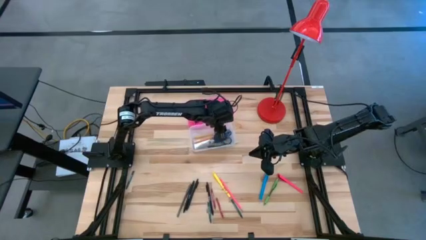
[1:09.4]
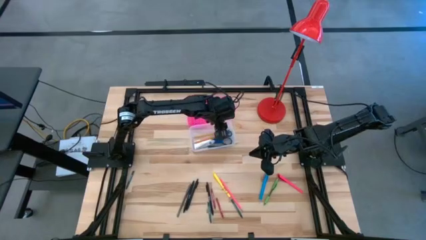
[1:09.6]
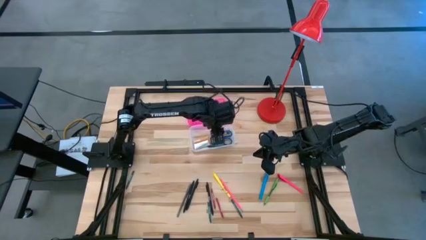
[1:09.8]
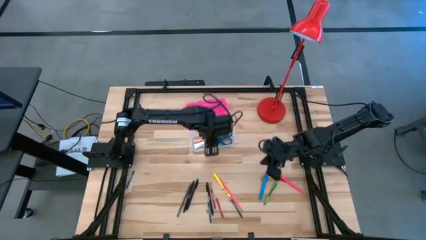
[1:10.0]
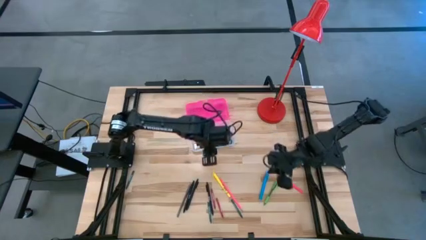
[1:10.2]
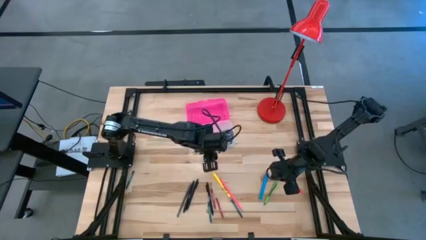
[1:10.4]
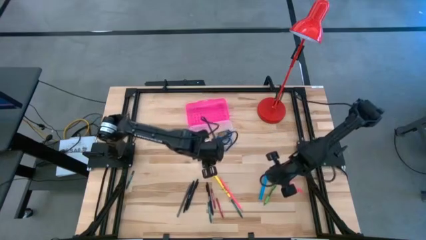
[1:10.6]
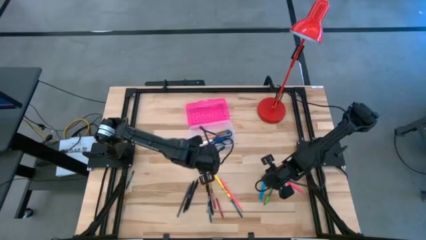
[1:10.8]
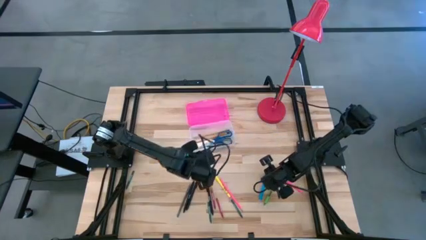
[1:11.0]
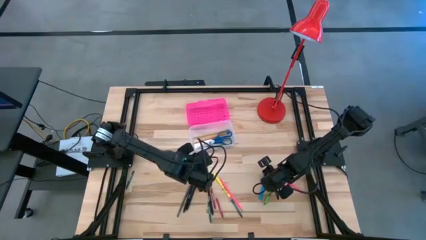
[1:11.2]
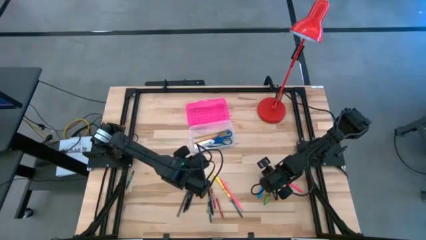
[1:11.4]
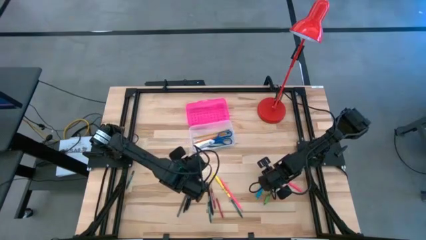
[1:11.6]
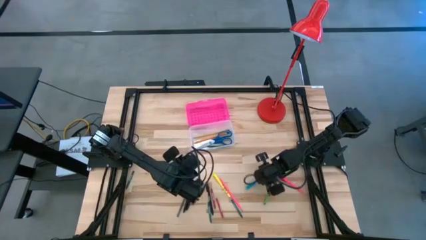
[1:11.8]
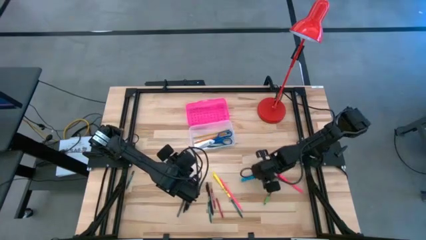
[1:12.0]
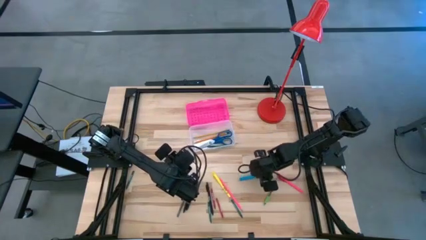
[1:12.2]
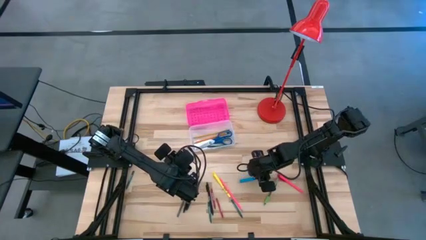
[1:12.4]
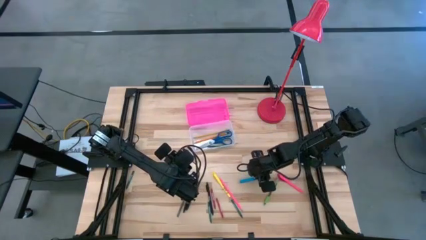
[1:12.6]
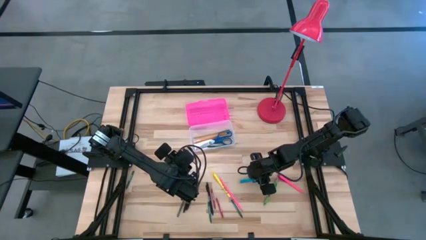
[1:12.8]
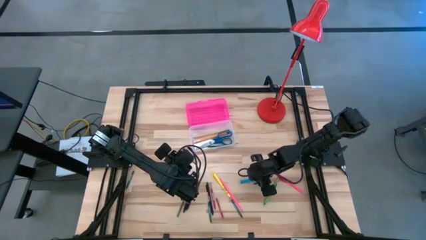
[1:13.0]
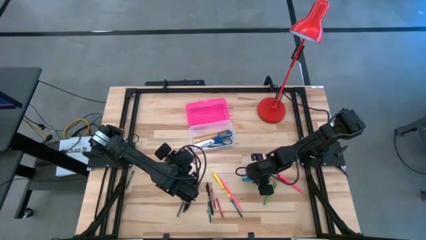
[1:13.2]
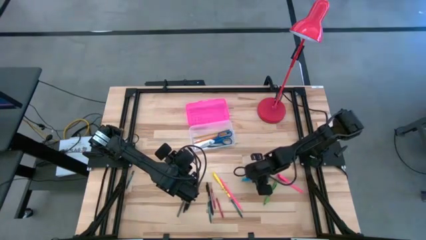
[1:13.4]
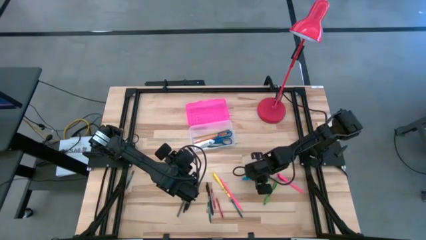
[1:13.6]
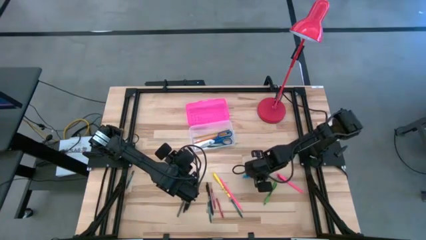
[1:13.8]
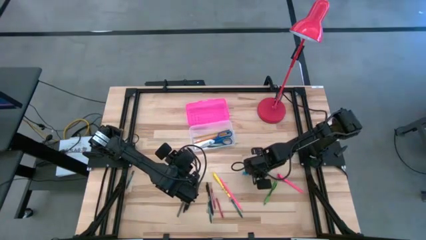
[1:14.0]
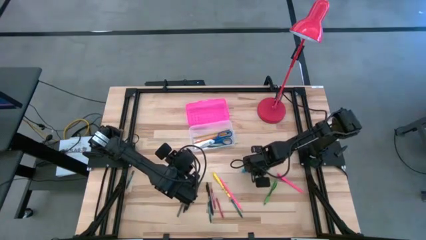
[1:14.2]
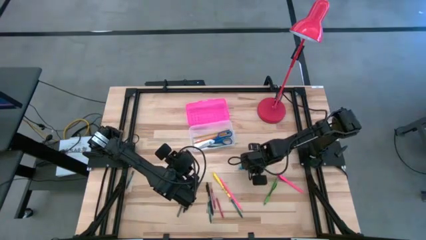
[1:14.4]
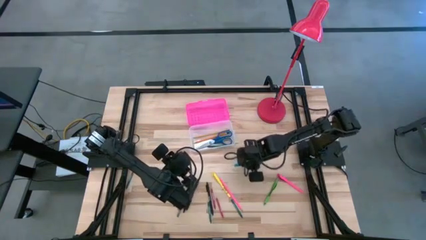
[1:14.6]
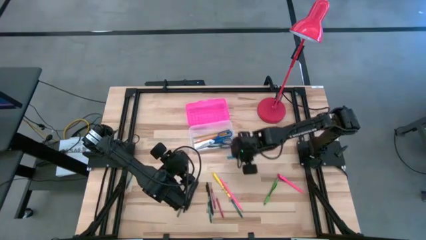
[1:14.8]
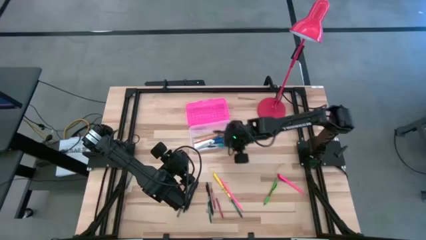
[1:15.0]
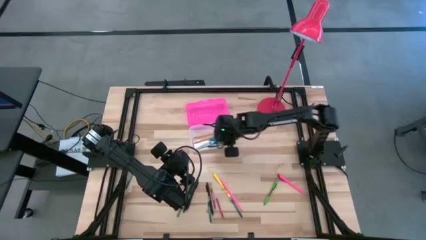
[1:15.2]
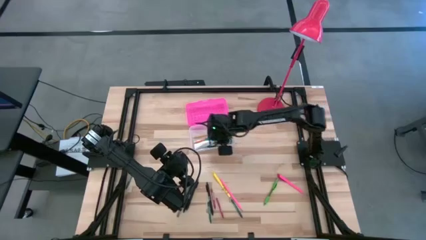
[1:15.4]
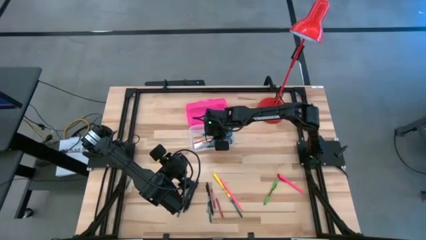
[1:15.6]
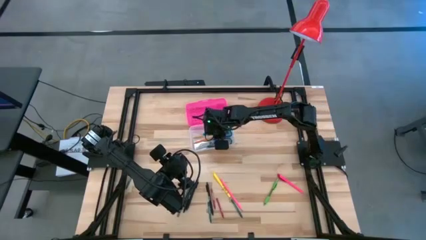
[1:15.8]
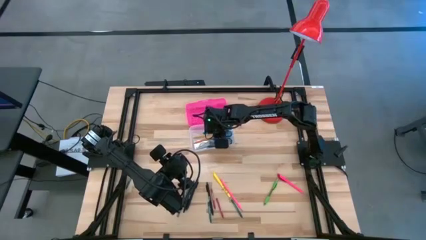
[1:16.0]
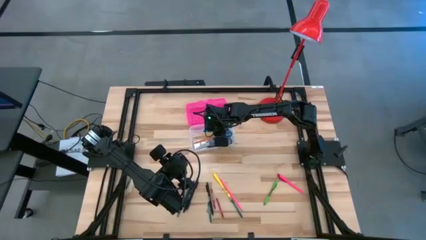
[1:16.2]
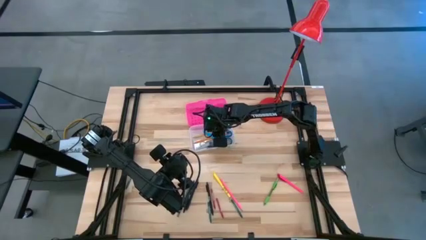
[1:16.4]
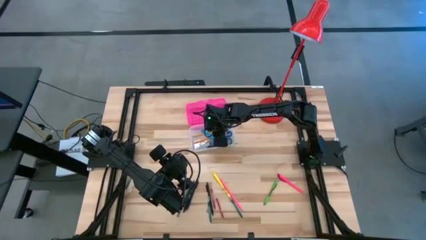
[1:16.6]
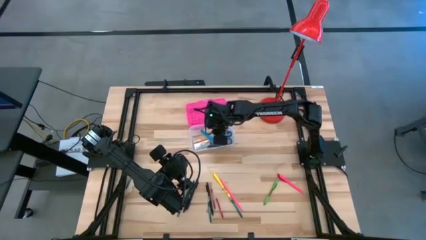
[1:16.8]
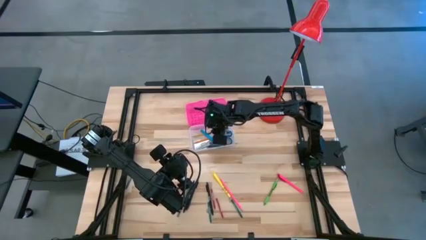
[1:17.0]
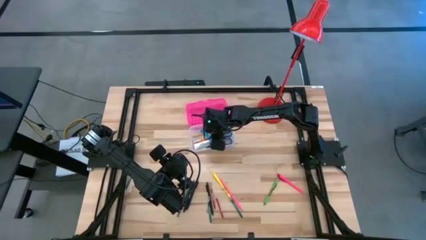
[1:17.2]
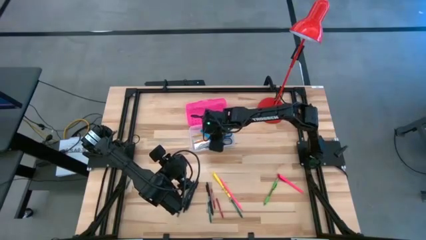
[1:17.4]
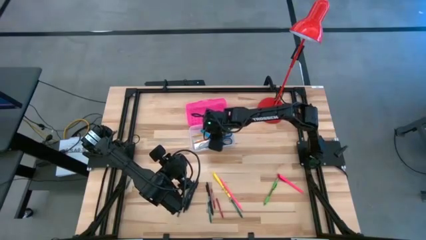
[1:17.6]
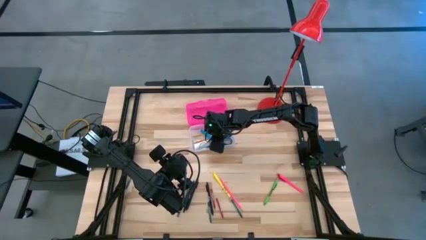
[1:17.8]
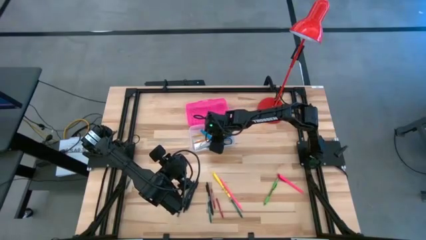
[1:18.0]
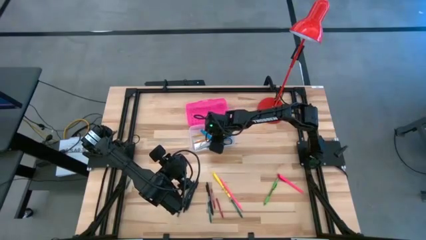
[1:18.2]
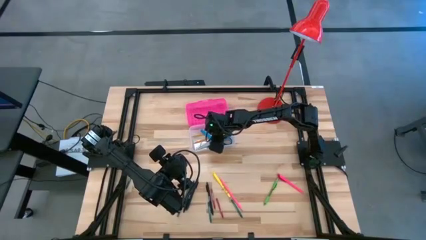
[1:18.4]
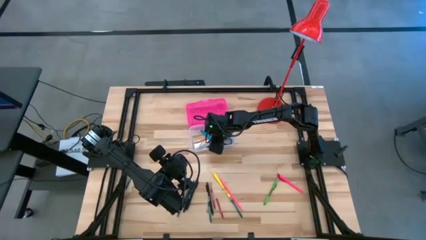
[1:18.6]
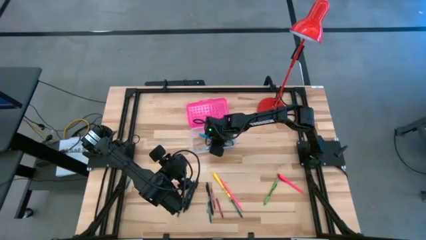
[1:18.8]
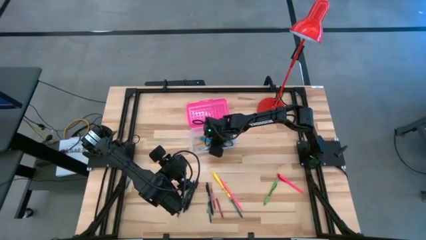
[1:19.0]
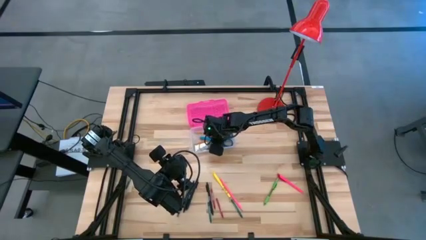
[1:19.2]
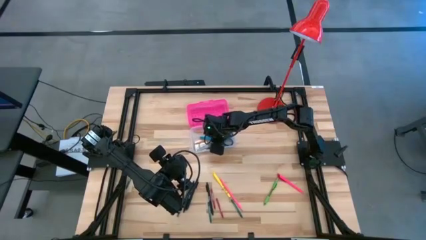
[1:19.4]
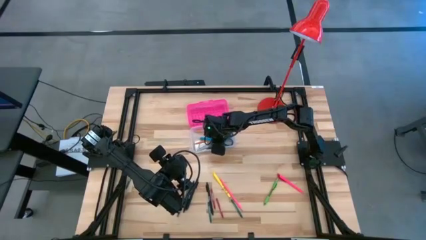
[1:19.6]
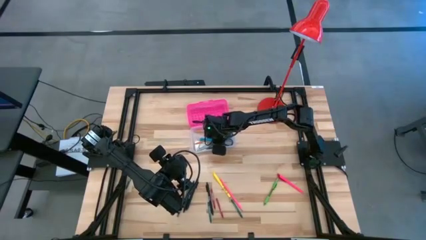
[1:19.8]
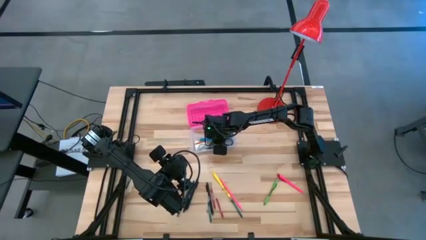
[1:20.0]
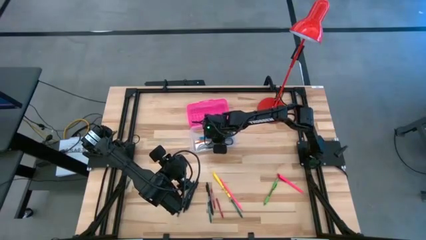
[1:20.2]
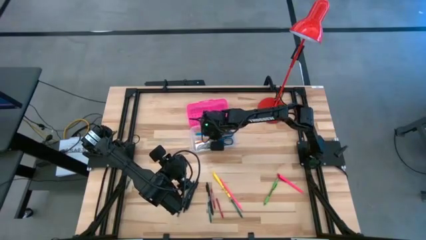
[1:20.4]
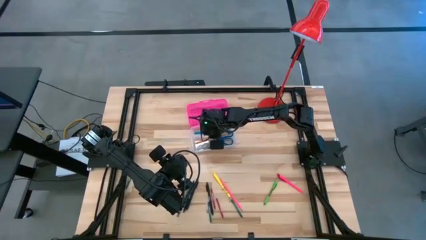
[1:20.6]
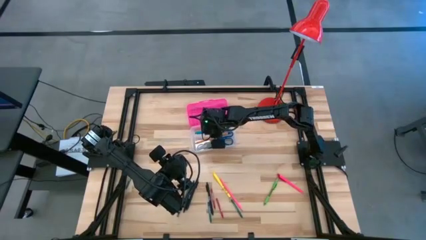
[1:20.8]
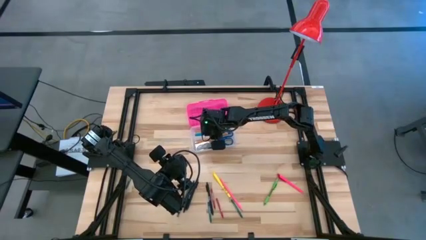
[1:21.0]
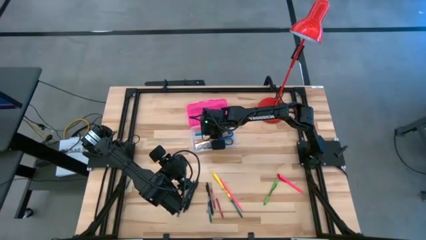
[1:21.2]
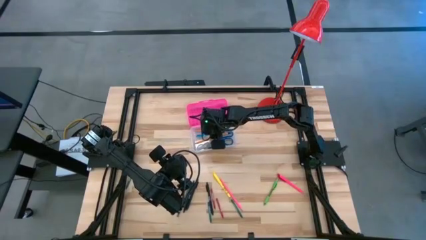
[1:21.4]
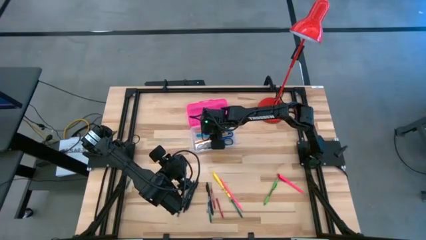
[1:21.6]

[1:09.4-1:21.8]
Task: Pick & place school supplies into a supply box
Put the blue pen into the pink supply box

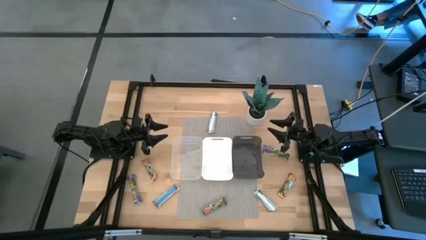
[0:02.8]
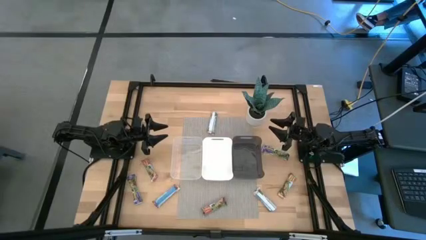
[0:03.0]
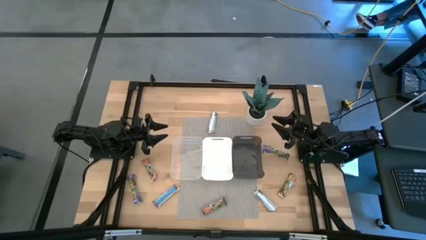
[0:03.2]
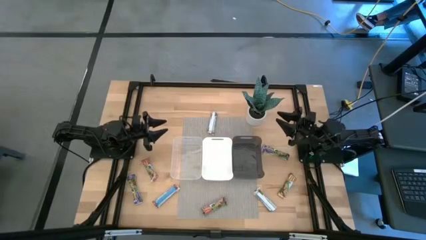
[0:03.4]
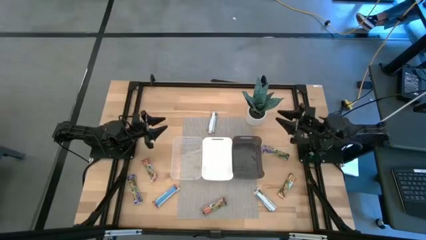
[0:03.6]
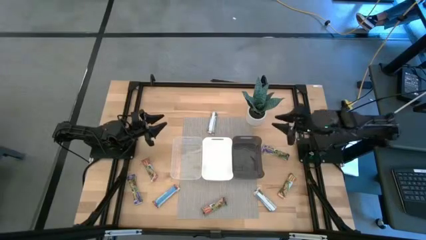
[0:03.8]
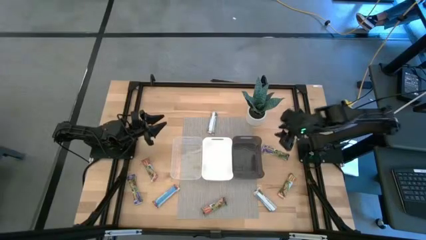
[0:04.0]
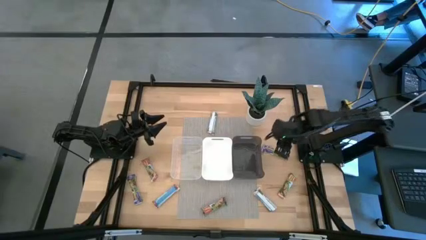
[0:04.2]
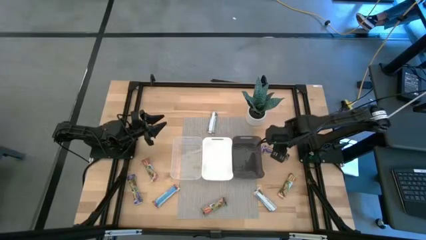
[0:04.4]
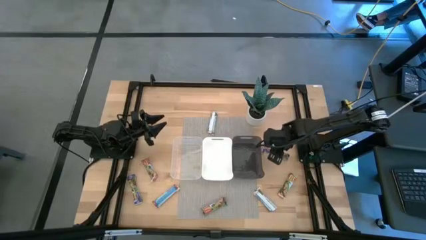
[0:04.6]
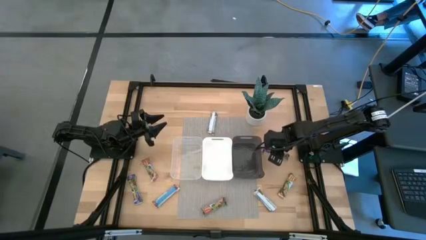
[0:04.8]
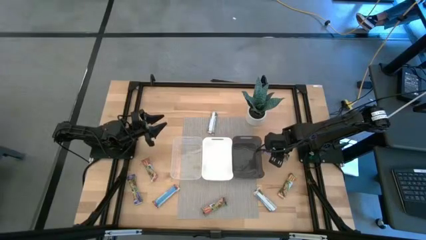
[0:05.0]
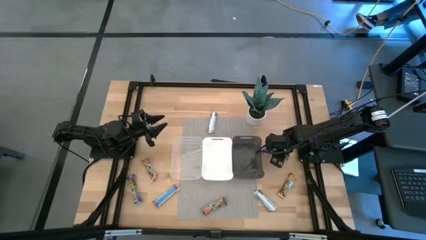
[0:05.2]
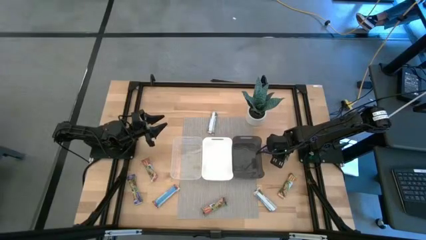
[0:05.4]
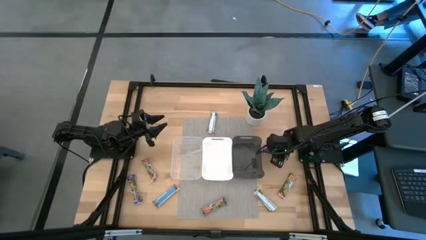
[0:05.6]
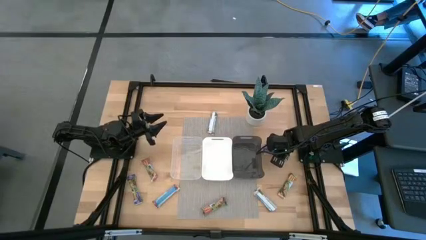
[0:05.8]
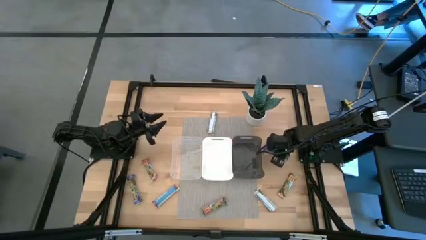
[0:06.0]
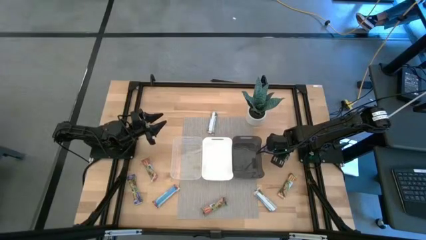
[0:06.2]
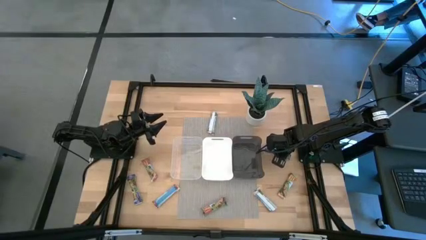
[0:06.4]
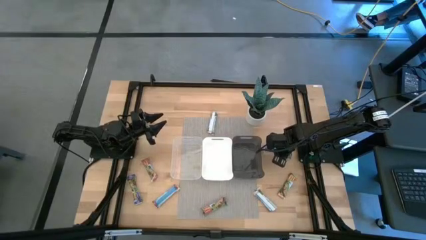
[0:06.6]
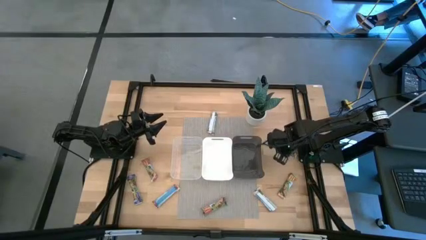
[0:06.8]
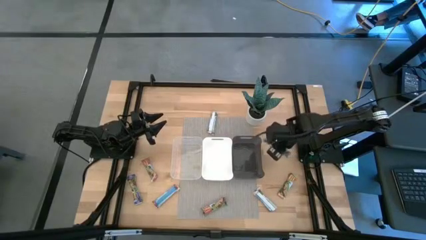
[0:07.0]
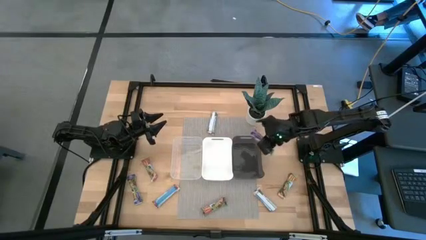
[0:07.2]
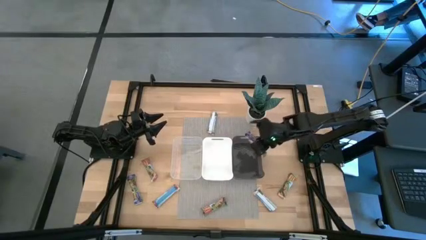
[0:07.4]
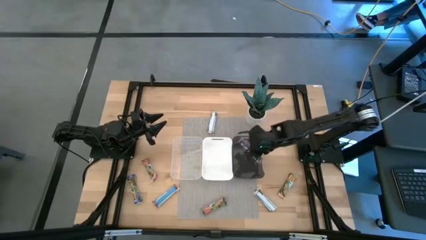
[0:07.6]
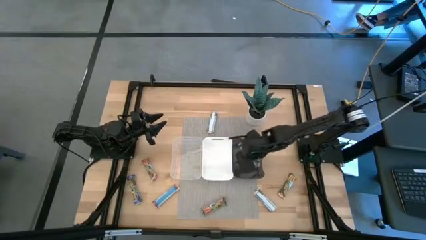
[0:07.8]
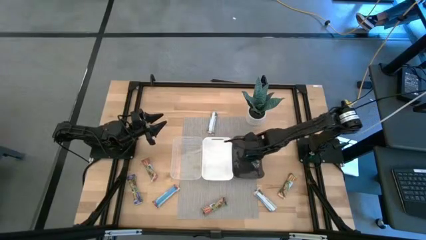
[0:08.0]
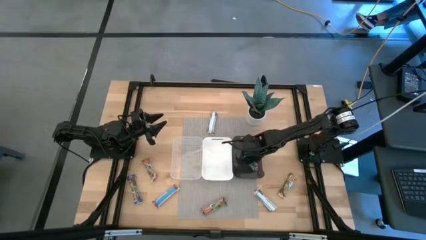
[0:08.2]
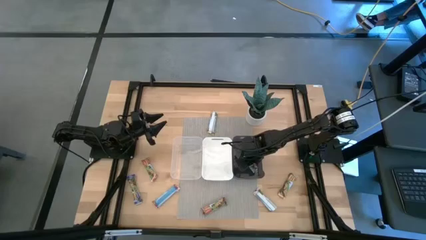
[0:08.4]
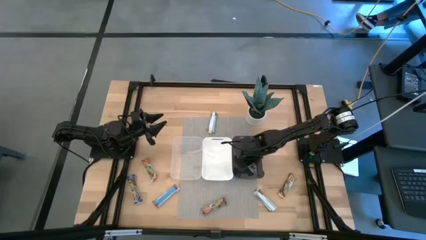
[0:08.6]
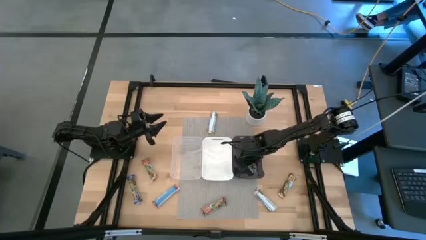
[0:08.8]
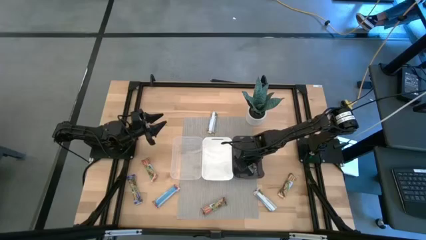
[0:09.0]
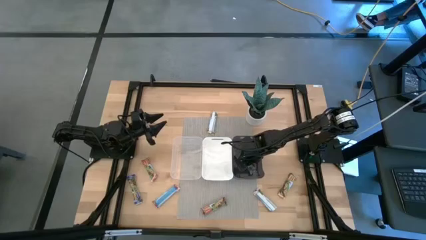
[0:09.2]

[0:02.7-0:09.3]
Task: Pick and place Granola Bars by type
Put the right blue granola bar into the black bin
